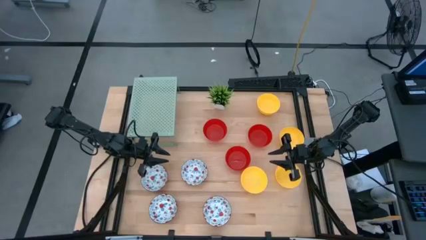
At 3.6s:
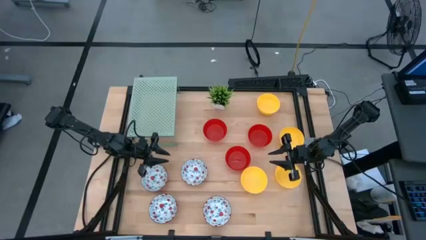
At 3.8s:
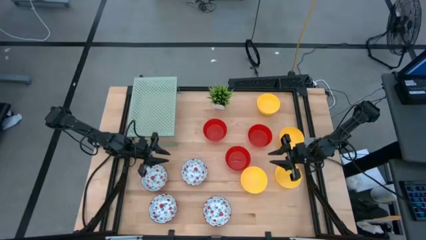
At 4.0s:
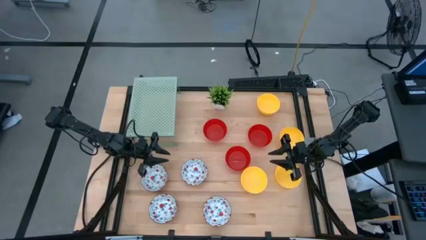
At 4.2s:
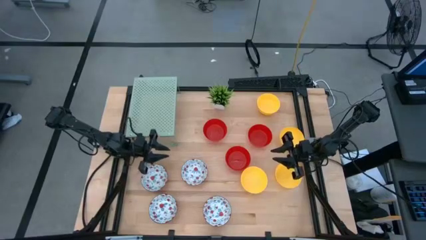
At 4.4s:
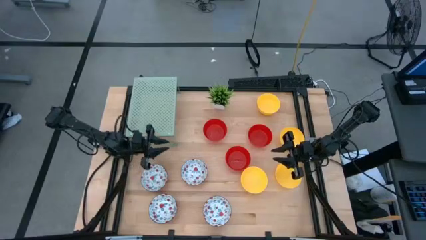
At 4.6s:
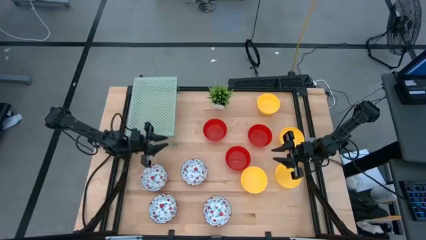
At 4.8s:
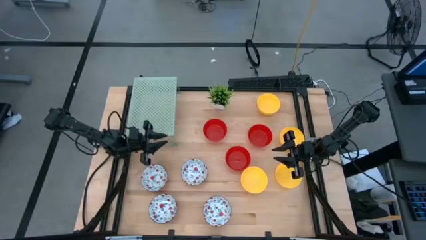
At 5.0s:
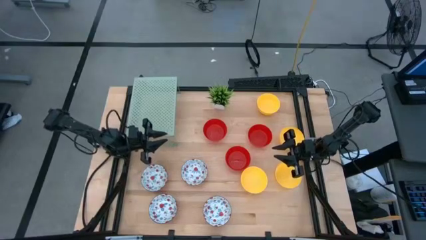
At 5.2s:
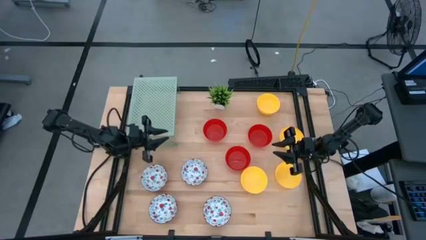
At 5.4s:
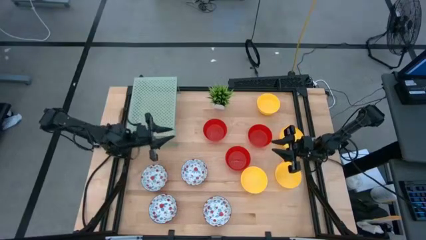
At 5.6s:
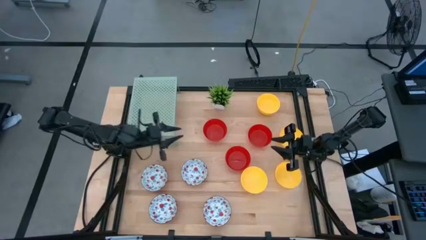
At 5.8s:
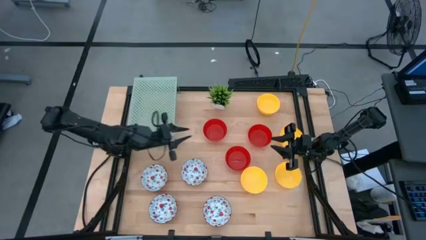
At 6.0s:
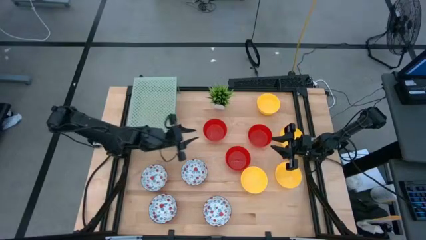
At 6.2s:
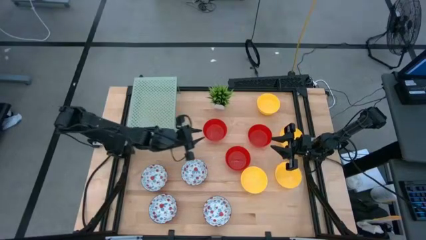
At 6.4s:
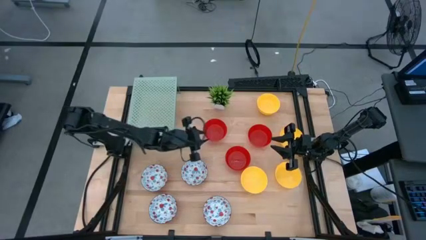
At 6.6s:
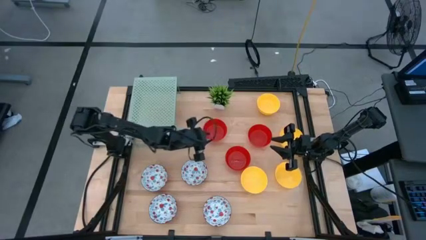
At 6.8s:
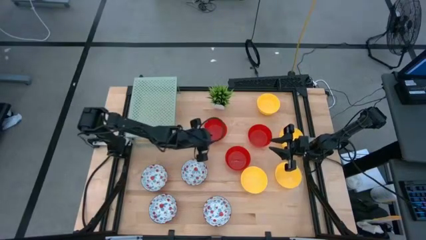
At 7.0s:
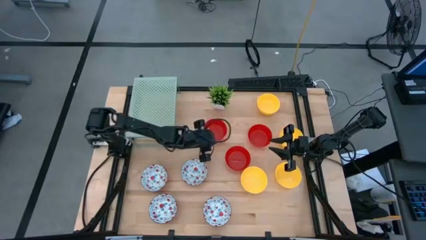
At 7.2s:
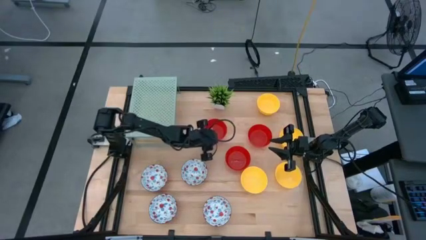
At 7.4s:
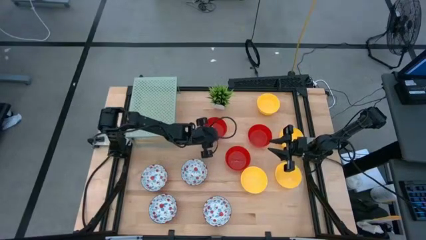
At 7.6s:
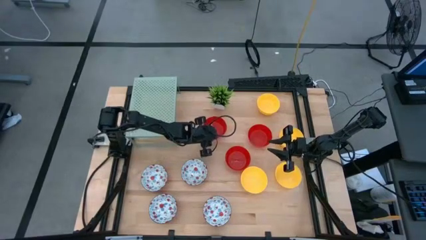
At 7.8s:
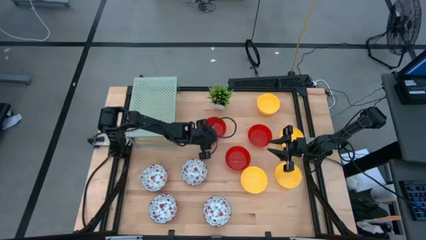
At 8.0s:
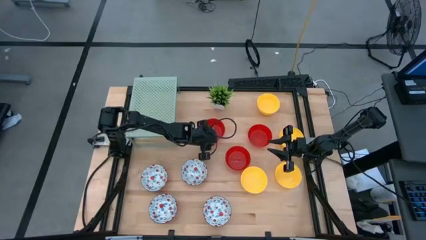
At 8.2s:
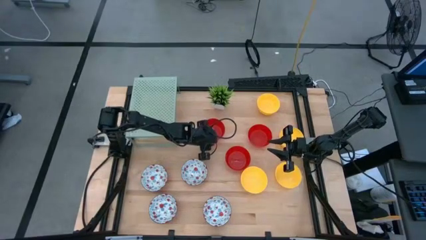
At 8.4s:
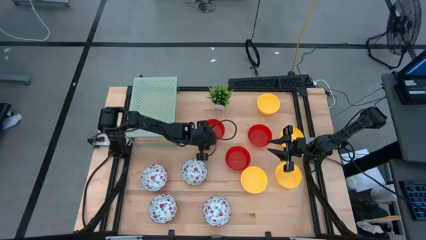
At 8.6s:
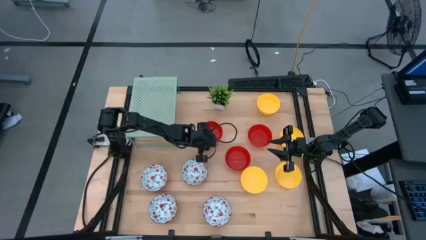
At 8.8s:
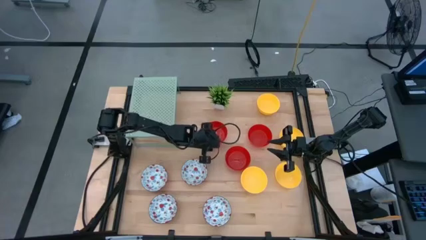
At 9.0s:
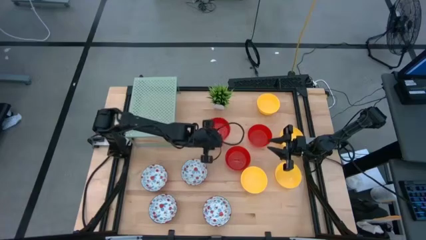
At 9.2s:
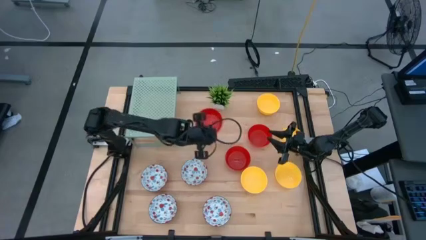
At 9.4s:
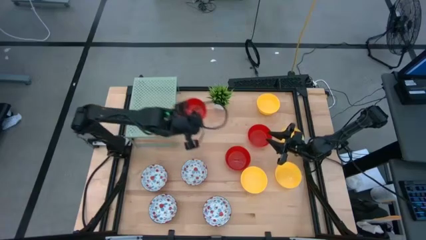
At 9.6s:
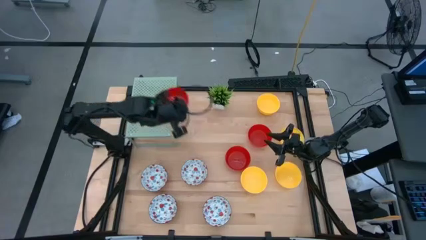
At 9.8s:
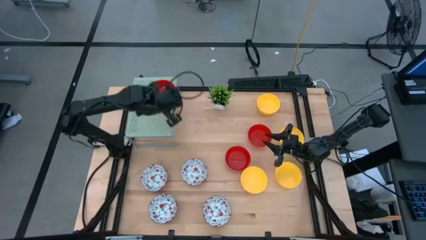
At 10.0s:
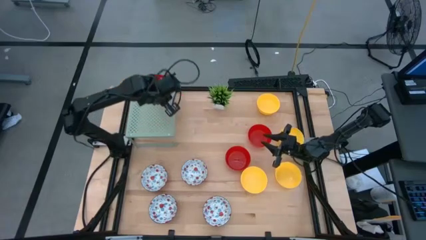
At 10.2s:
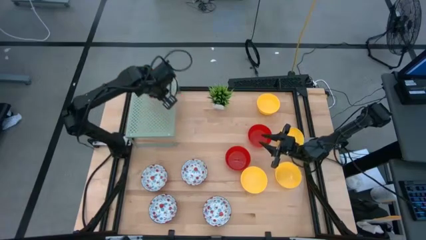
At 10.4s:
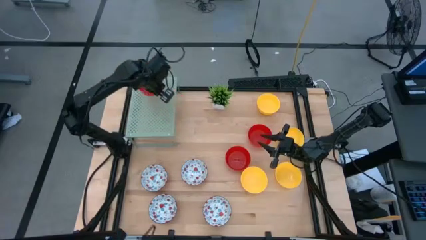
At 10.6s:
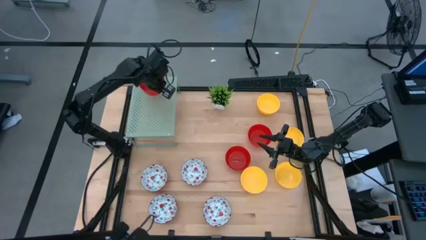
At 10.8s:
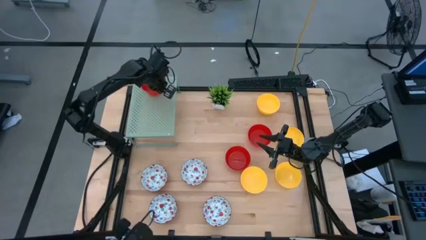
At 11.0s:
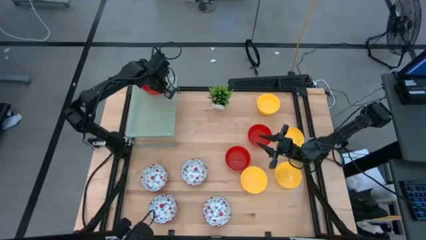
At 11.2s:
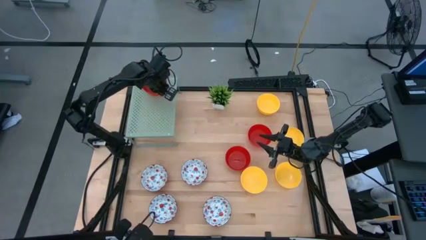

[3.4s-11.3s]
Task: Pick & Place Mini bowls
Put the red bowl on the shelf

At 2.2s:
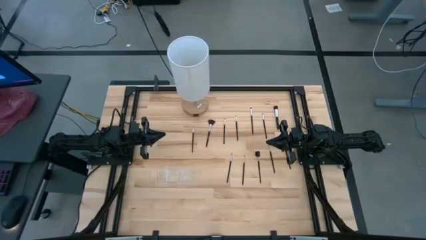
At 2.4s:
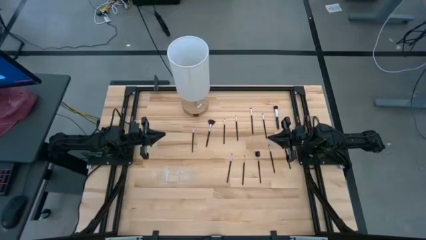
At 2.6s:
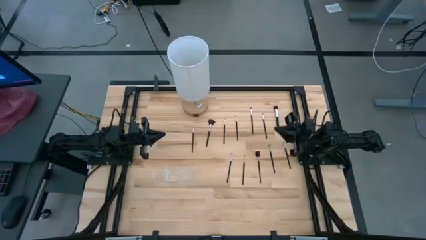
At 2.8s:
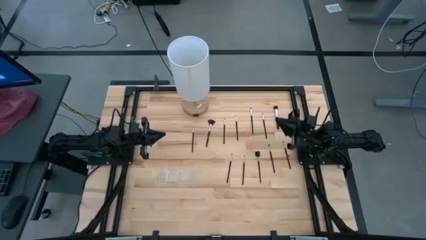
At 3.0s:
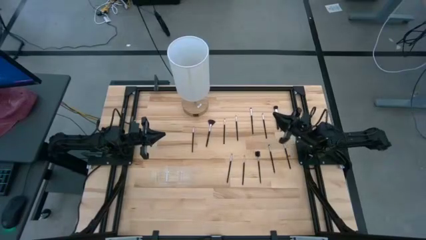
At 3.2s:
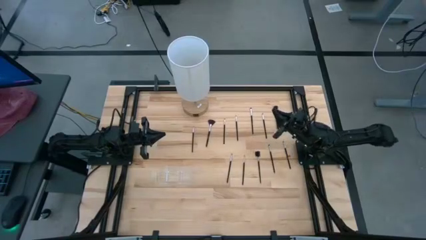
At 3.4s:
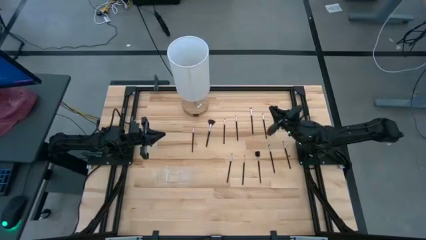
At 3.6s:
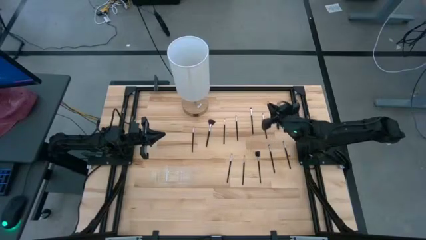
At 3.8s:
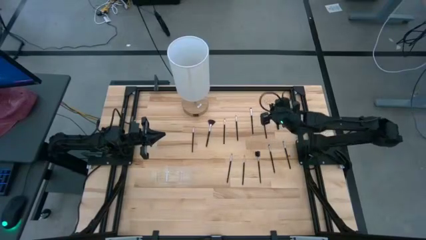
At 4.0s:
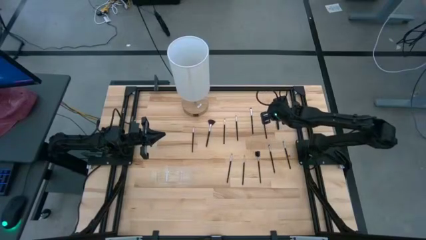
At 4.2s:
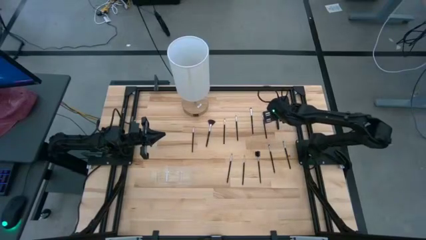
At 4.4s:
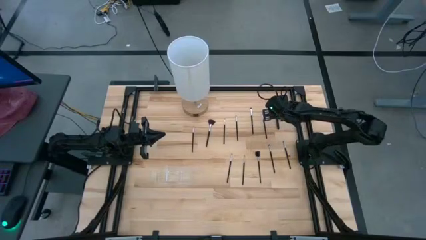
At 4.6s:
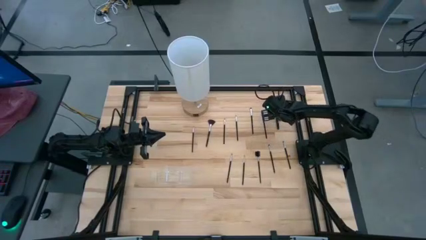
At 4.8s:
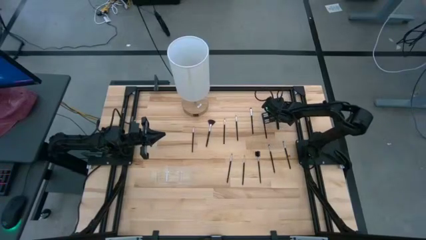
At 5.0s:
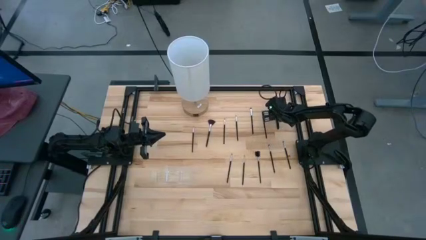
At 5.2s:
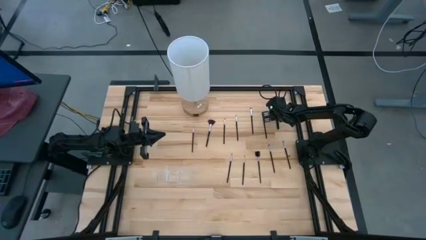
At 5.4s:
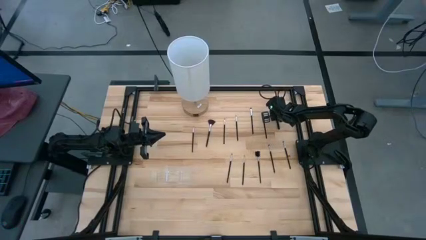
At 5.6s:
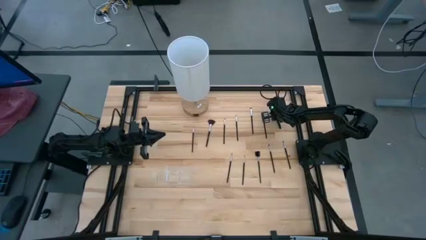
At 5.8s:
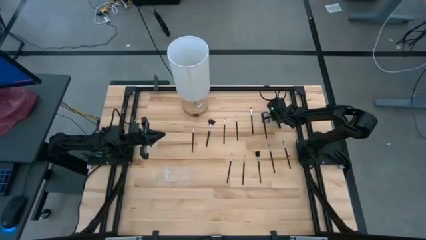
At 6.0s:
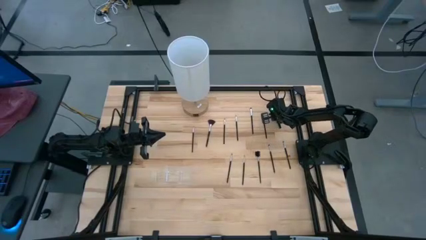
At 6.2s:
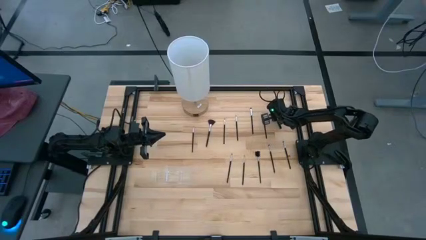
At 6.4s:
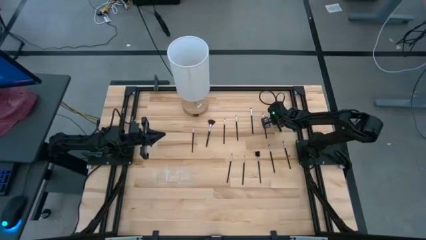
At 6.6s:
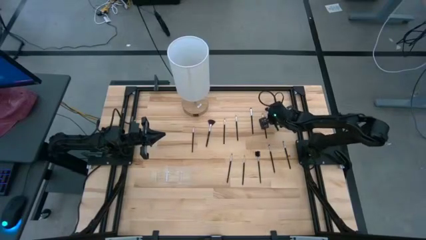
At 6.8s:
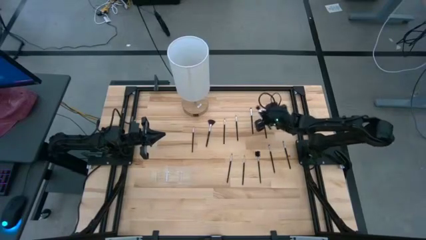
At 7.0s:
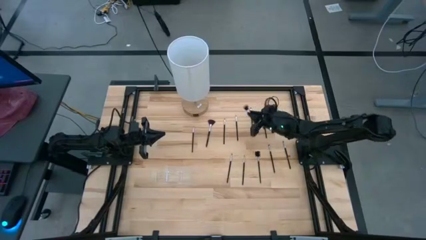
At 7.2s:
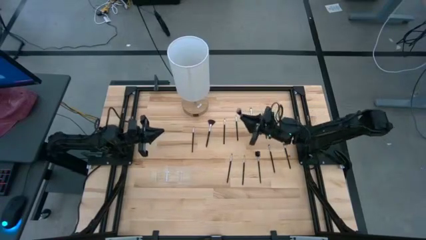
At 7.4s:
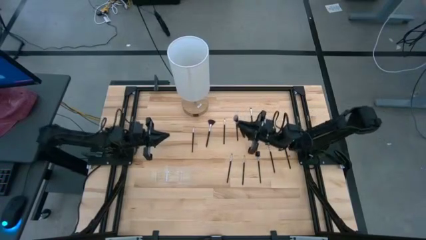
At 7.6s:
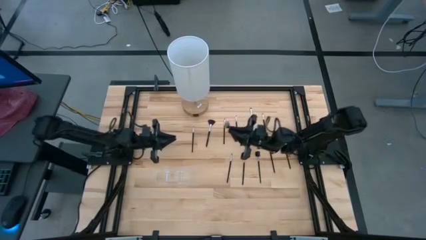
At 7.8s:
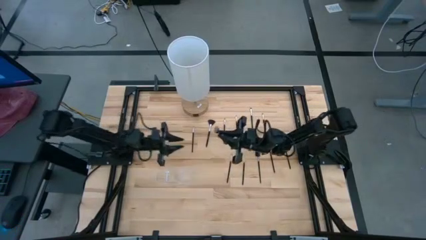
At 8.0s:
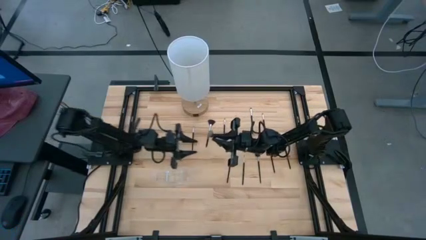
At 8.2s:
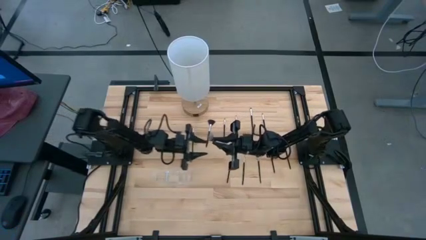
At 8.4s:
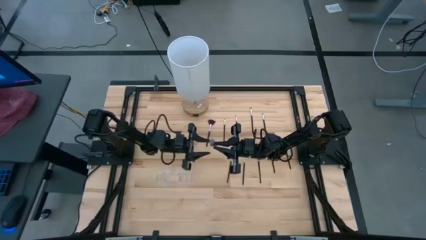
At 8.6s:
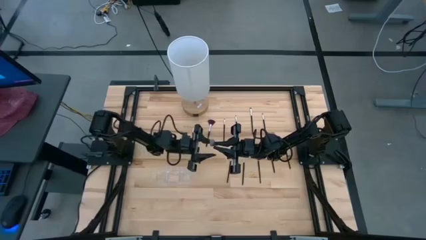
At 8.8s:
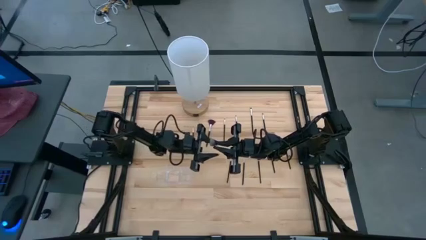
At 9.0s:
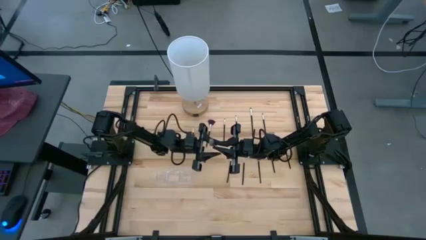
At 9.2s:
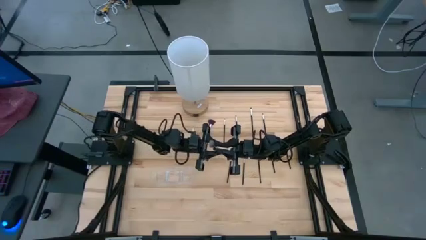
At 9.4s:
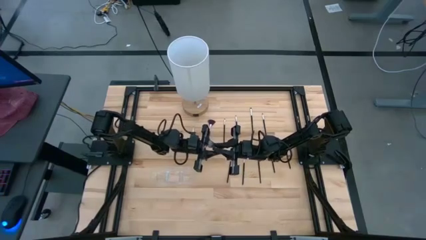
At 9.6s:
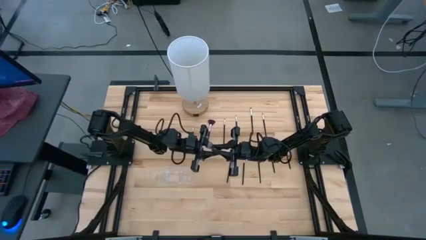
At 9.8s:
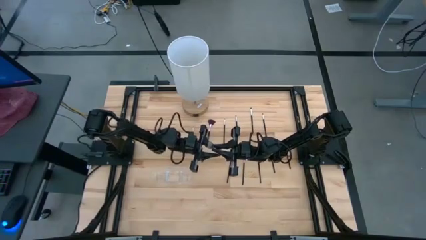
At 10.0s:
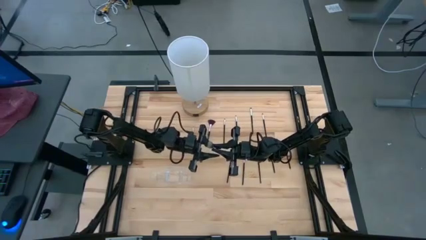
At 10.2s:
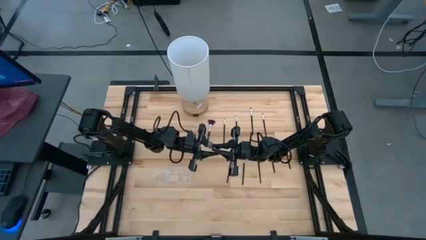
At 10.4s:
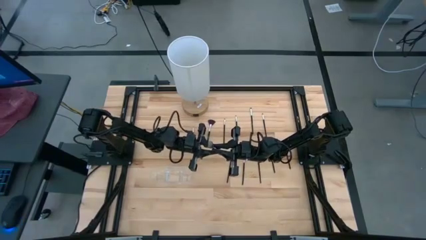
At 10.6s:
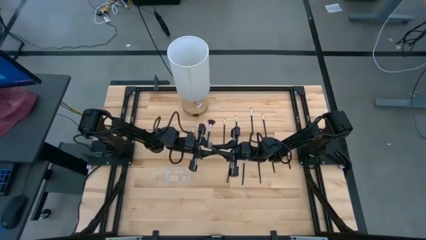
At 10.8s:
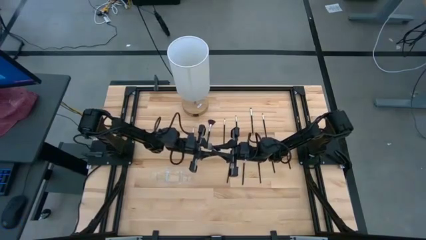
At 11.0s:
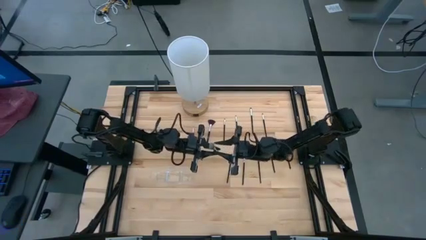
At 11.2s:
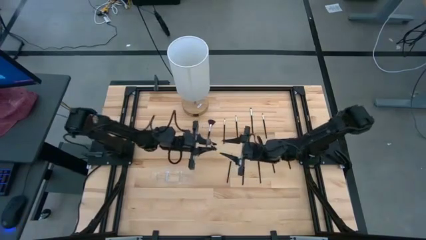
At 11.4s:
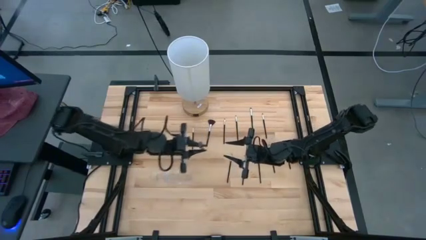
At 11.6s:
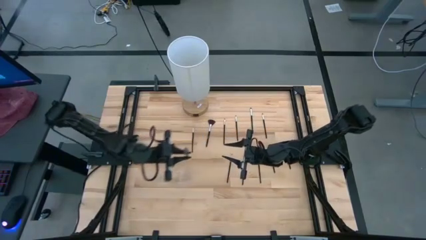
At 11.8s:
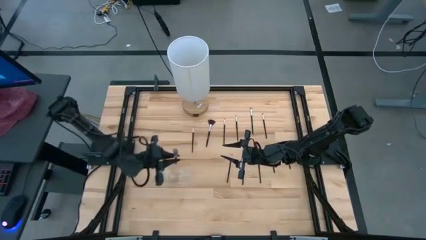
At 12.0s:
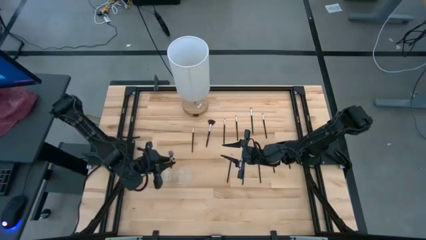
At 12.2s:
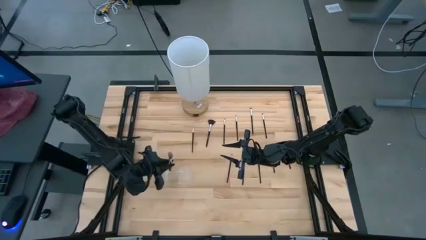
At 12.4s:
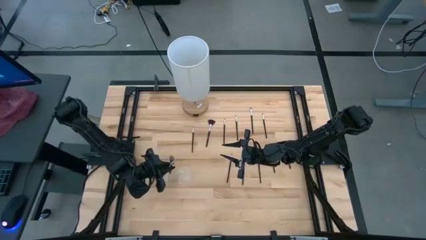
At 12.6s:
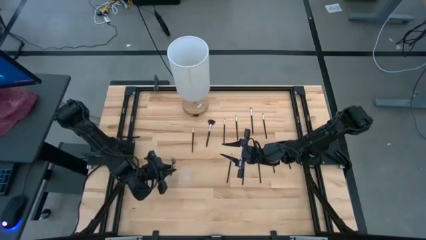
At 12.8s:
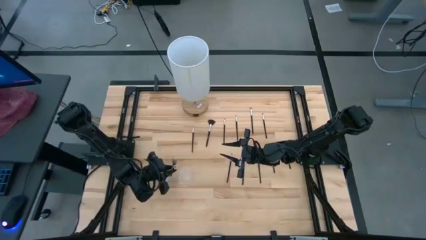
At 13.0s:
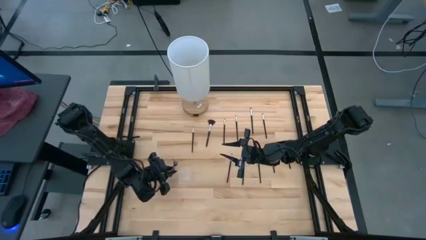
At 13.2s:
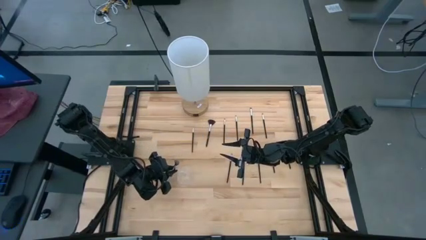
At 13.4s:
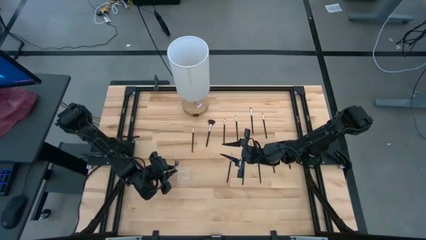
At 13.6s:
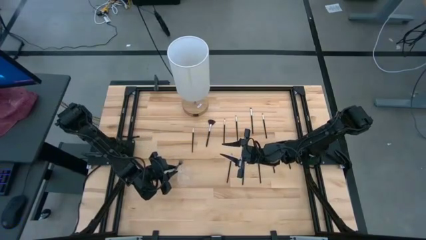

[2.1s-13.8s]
Task: Put items in baskets/containers
Put the blush brush in the transparent organizer
